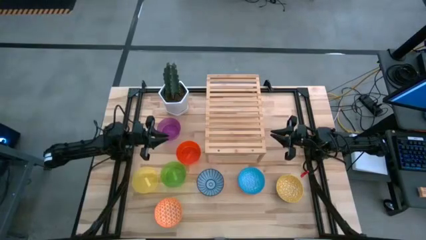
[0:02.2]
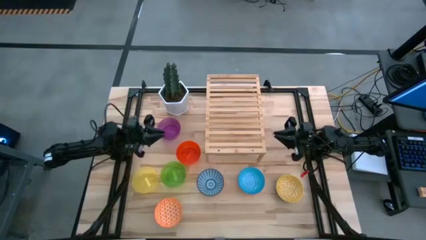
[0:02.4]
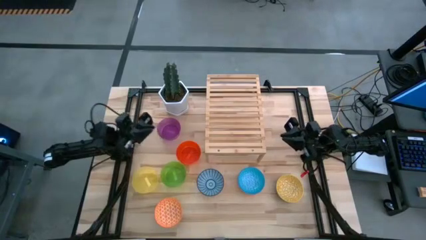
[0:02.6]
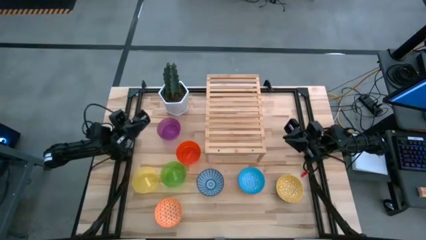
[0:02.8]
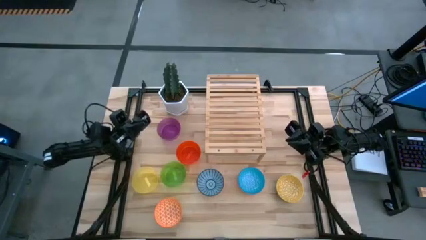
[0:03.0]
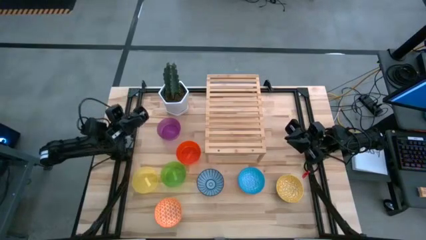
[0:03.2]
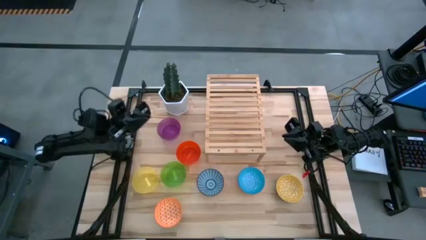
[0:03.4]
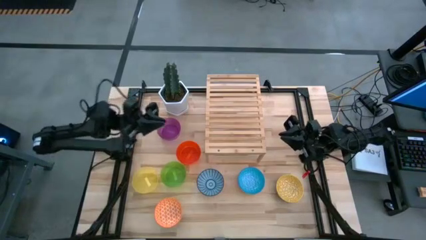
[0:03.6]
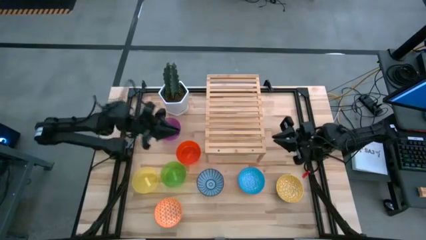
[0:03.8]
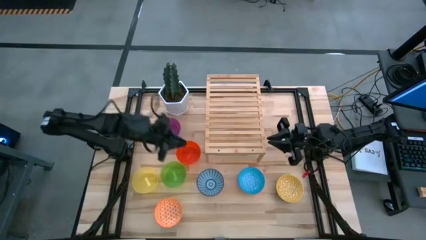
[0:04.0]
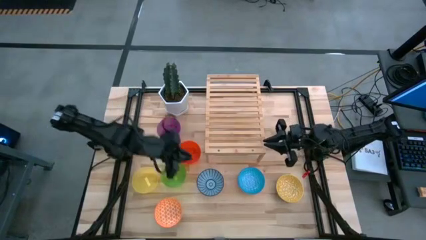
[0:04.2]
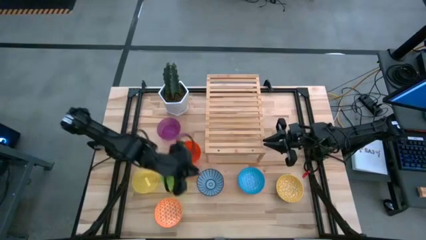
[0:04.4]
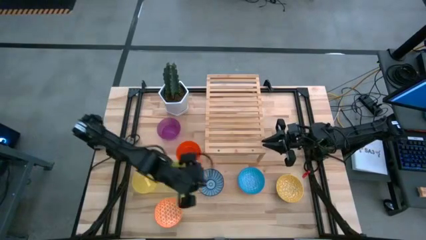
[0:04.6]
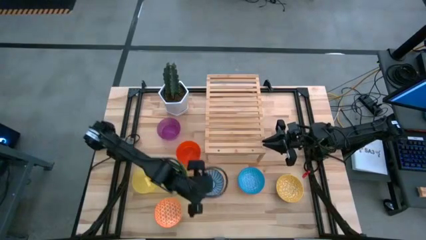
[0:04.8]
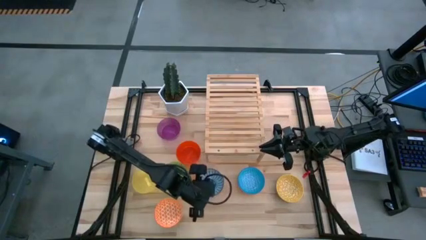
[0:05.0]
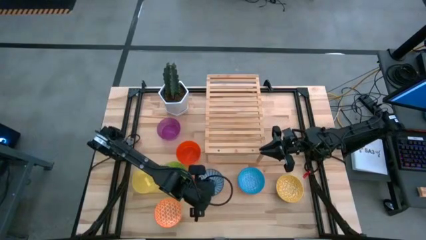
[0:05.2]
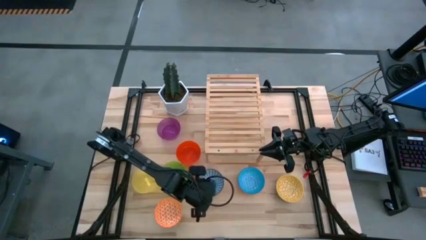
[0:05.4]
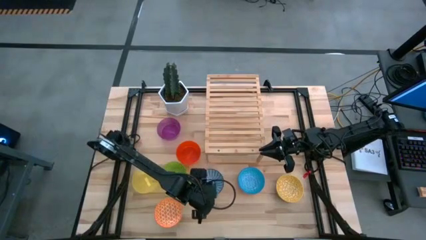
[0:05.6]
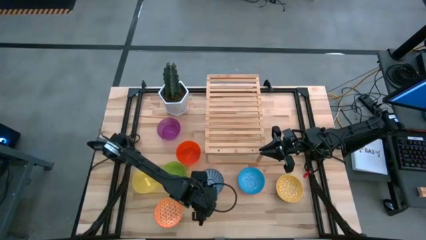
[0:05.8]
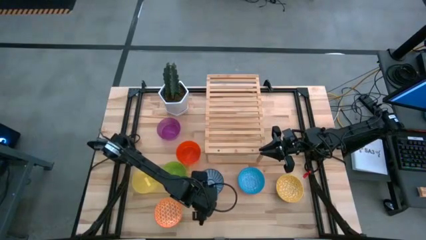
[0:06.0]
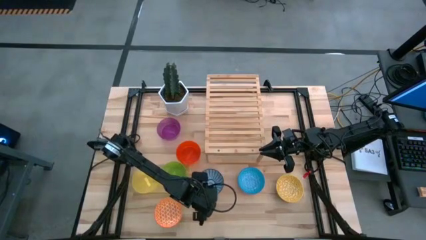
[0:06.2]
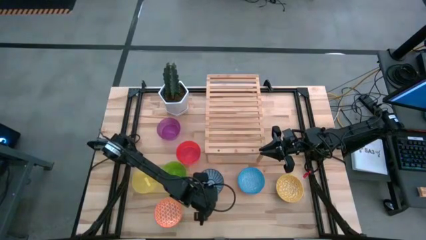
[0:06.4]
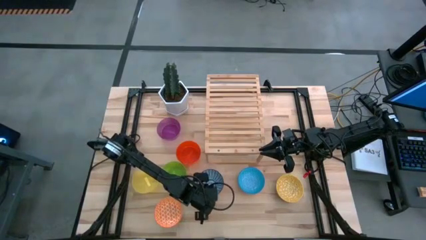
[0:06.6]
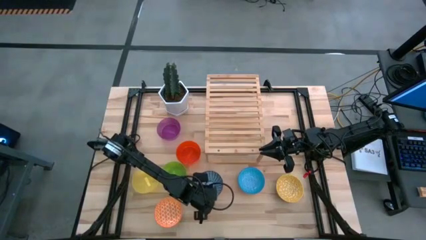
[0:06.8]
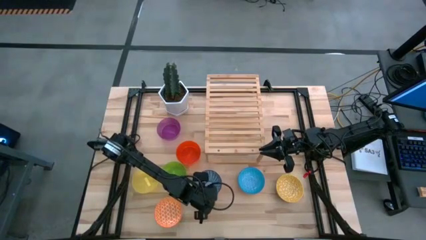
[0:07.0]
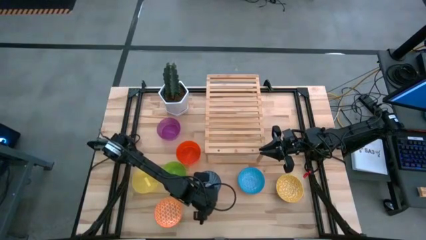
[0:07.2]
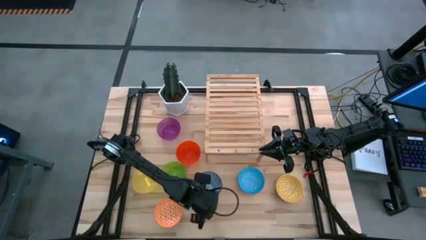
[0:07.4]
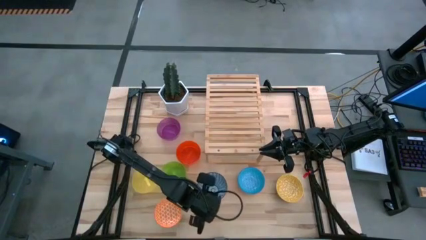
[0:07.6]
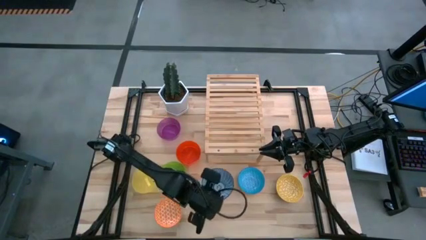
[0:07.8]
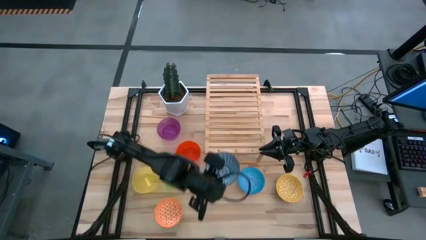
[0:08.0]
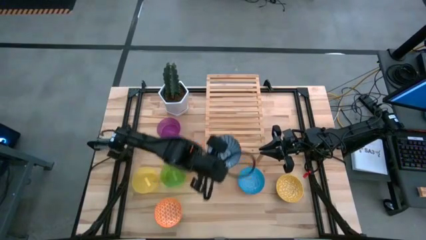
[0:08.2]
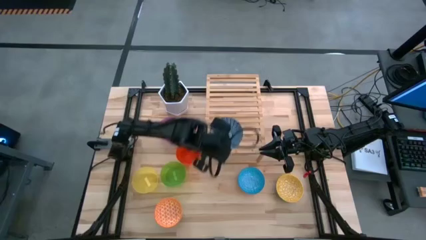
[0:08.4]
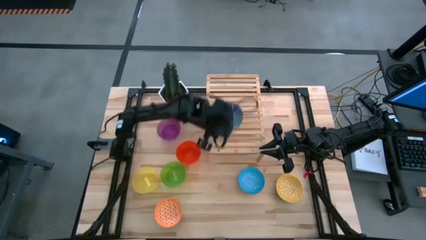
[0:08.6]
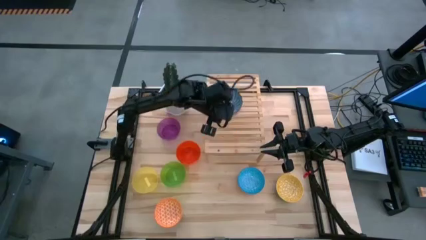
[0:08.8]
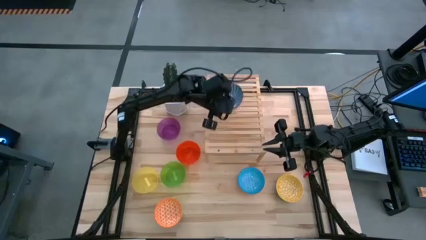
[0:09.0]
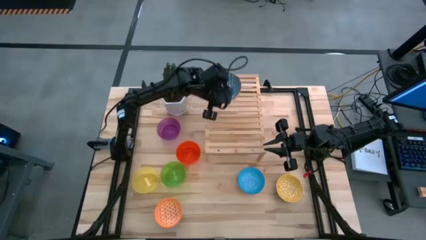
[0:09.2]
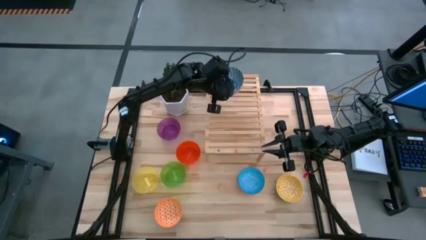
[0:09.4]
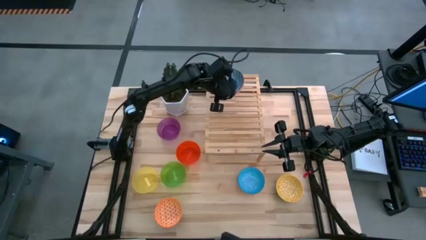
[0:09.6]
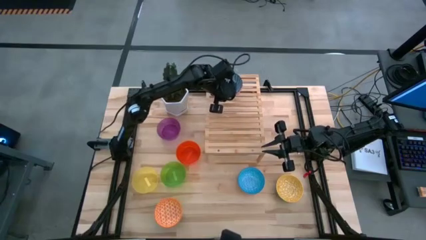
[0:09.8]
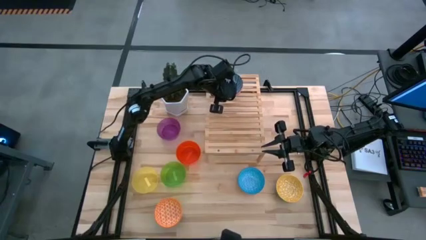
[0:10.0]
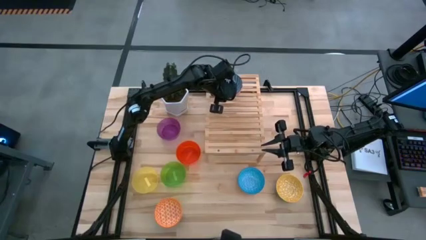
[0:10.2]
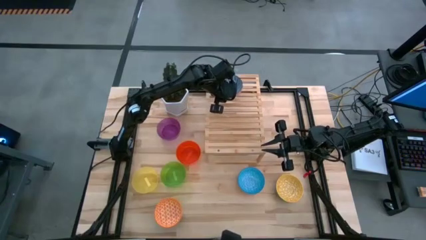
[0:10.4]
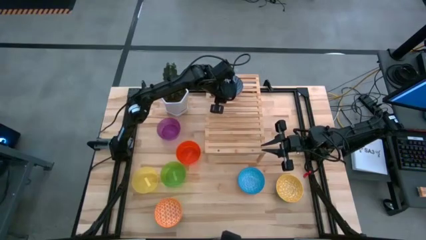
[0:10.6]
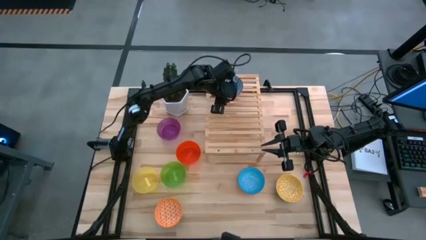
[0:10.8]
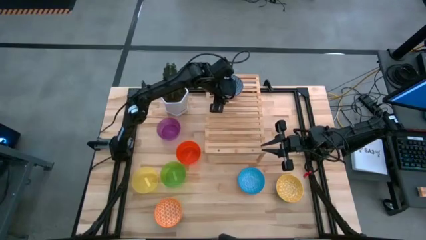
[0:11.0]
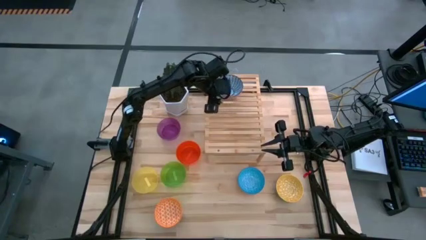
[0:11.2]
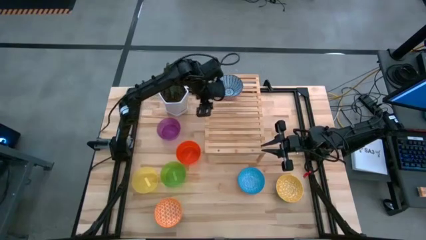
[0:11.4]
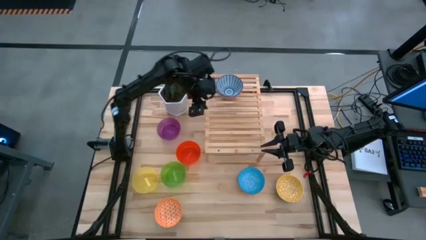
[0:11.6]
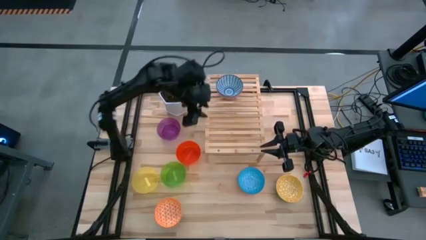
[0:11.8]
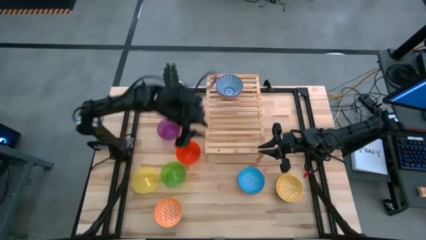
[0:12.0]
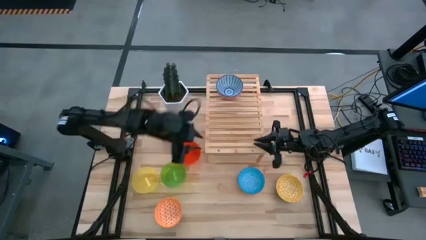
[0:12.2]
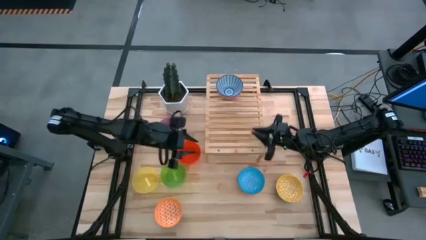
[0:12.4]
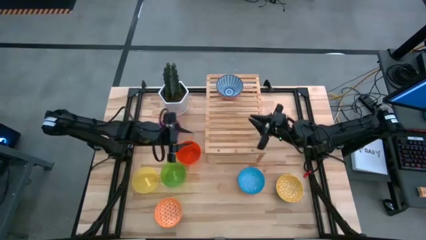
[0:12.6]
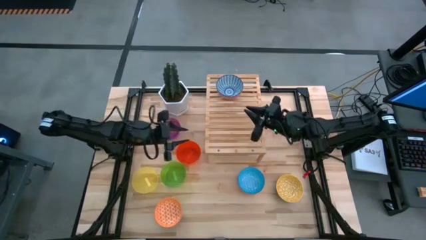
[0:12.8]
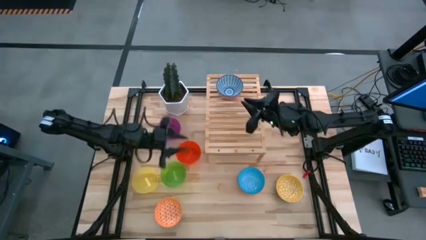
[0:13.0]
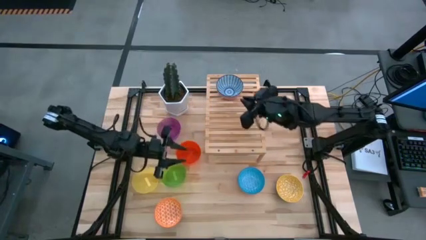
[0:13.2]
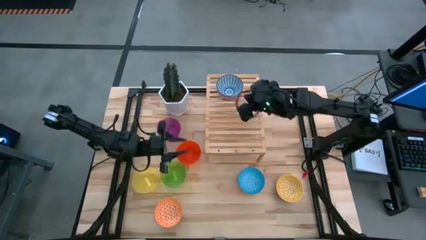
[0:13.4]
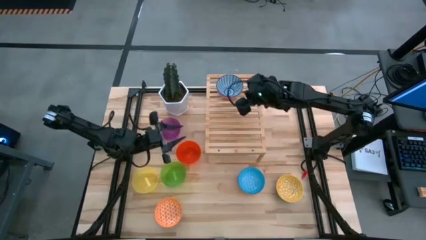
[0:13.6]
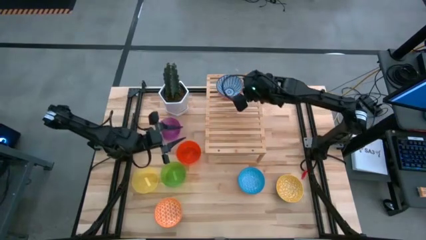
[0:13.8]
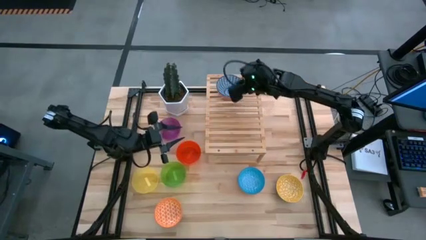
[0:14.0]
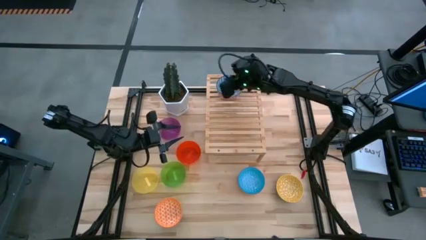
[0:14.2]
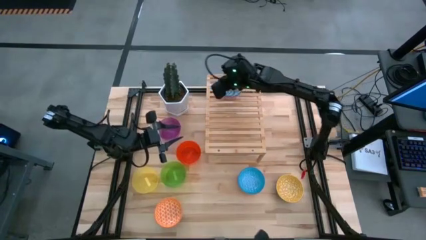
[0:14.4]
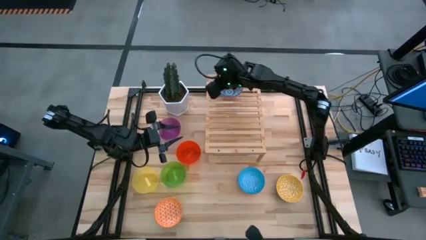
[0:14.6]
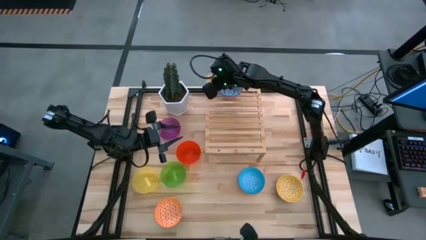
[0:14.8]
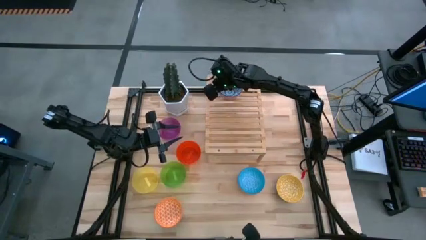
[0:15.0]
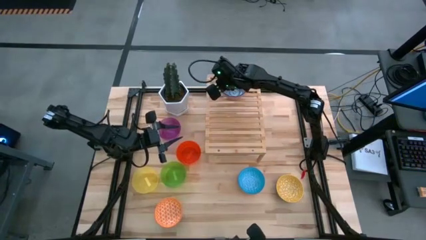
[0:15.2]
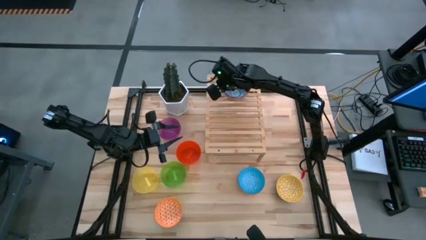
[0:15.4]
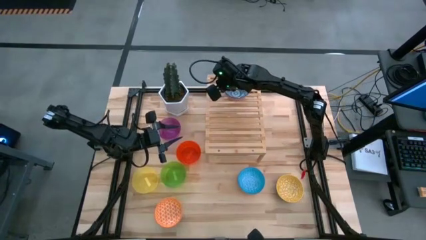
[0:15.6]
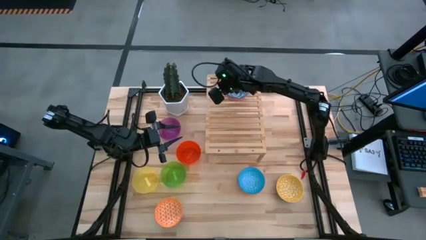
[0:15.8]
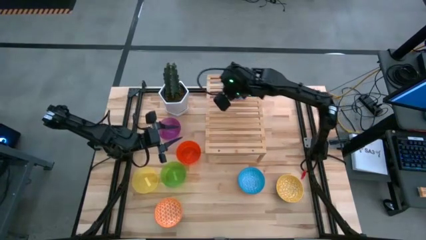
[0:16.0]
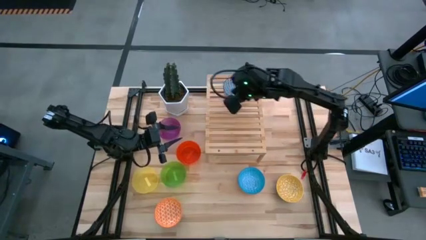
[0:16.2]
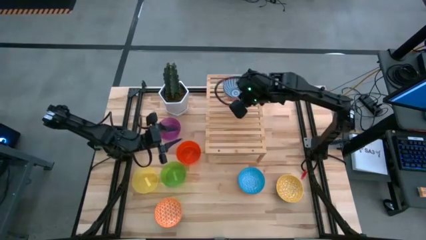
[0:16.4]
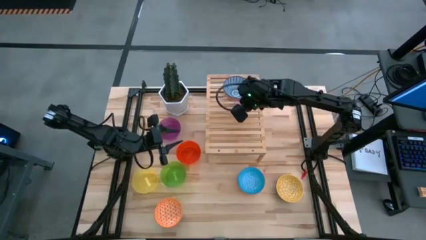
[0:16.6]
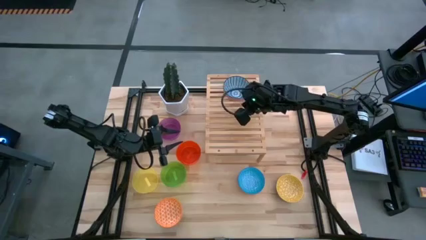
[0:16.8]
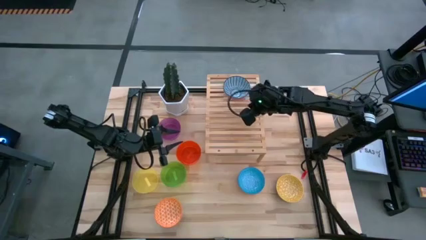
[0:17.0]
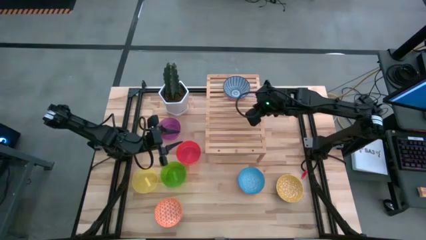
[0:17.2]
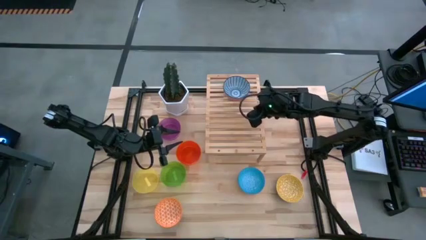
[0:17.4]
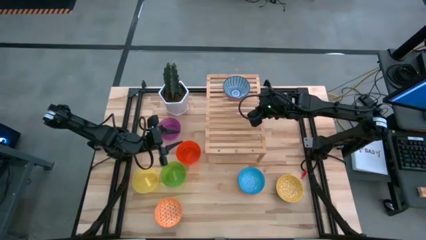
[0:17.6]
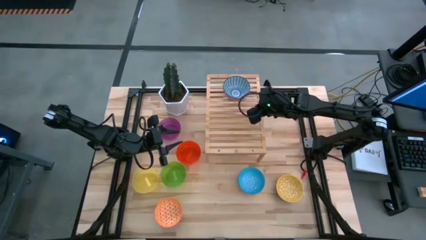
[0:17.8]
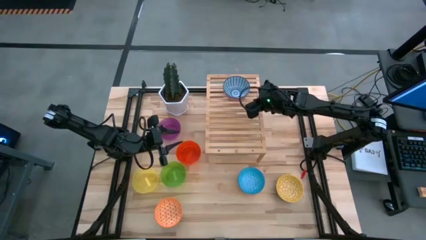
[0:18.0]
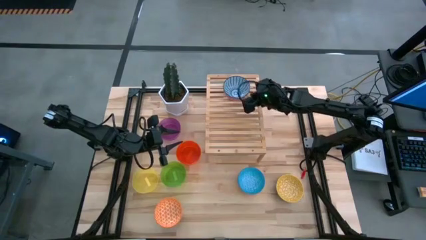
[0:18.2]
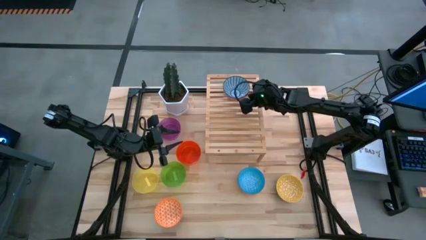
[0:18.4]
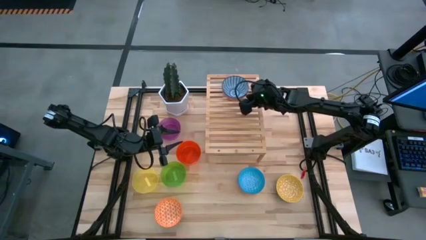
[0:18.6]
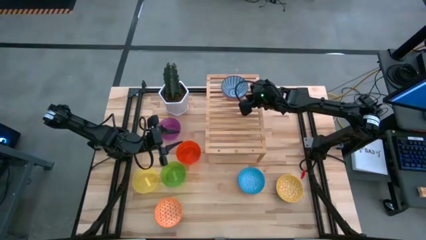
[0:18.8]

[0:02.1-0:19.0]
Task: Place and stack bowls onto a shelf
Put the blue patterned bowl on the shelf

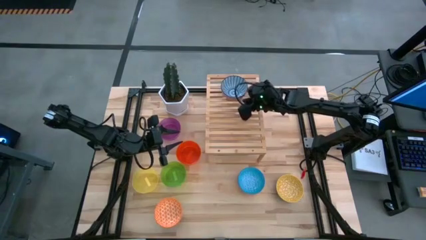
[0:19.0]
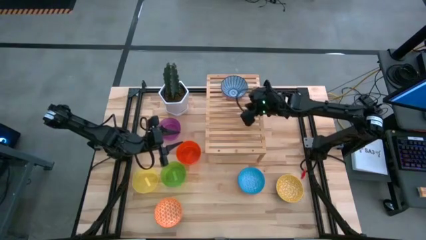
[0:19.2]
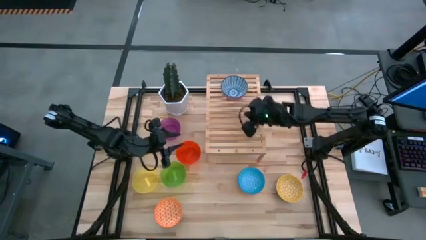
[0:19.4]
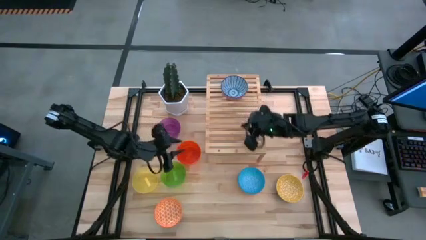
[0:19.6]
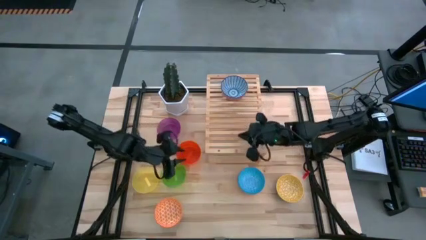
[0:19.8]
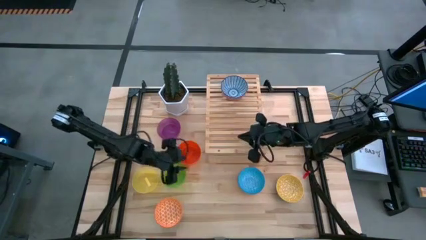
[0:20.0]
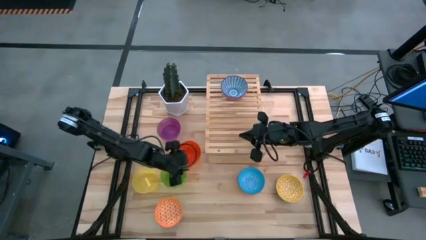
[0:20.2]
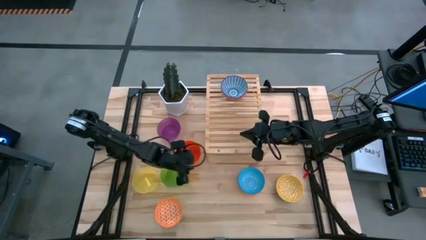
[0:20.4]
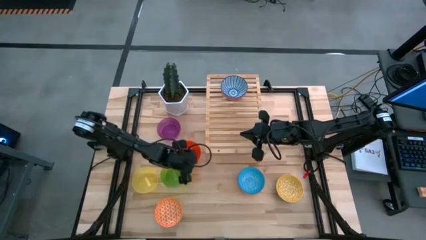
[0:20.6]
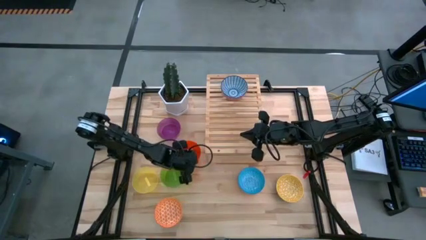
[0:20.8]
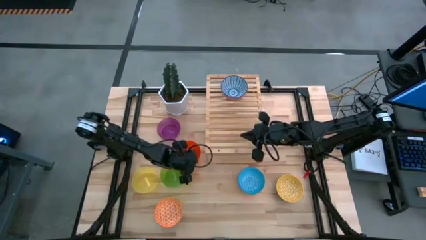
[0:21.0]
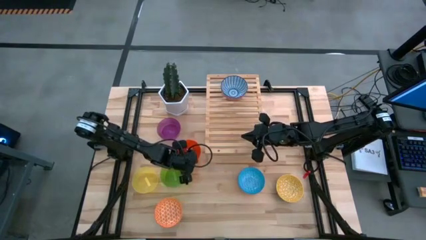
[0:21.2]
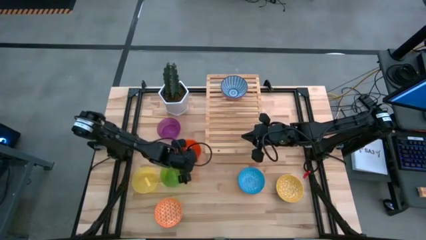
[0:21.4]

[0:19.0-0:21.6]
Put the orange bowl on the shelf
